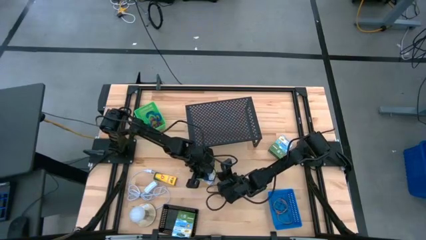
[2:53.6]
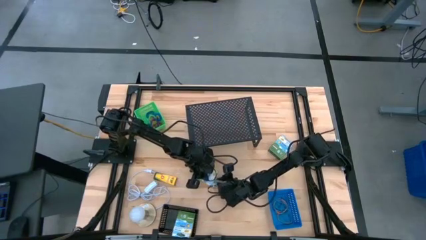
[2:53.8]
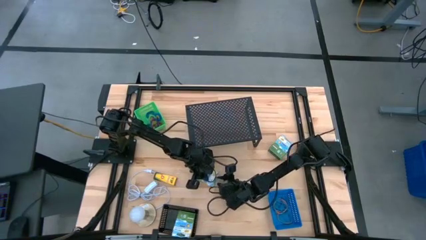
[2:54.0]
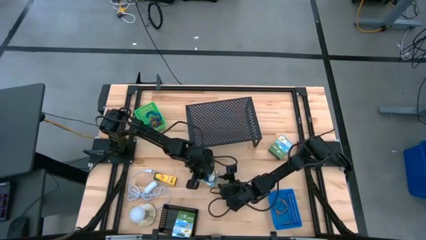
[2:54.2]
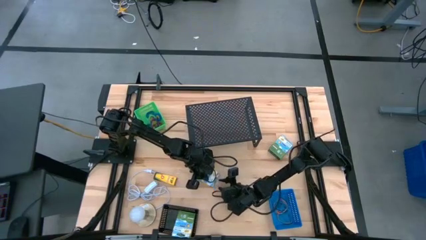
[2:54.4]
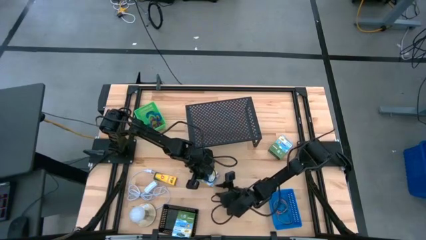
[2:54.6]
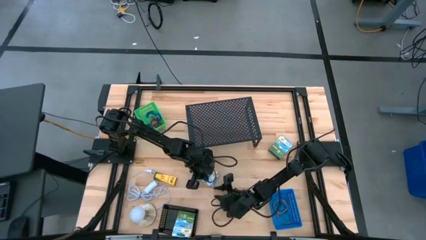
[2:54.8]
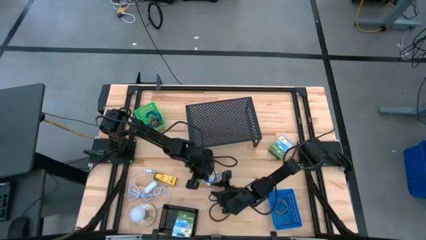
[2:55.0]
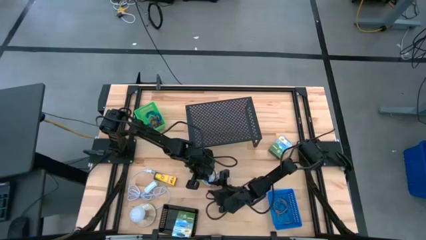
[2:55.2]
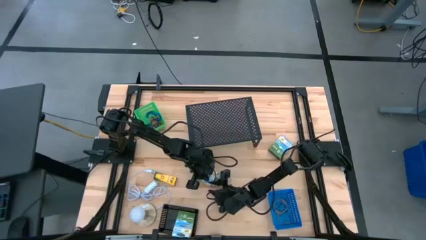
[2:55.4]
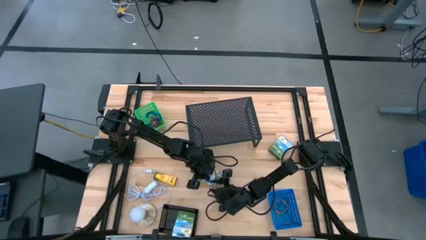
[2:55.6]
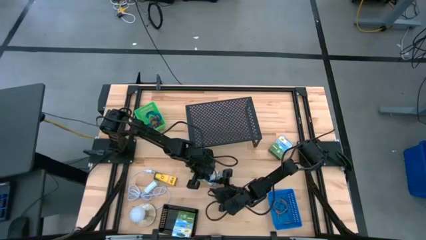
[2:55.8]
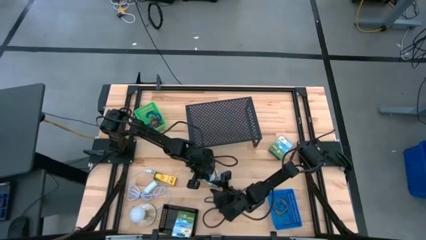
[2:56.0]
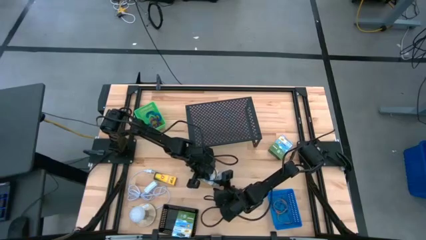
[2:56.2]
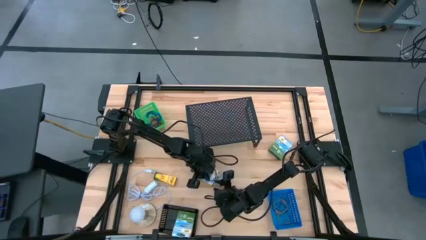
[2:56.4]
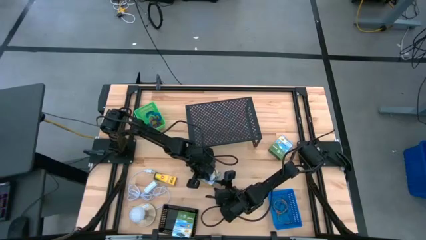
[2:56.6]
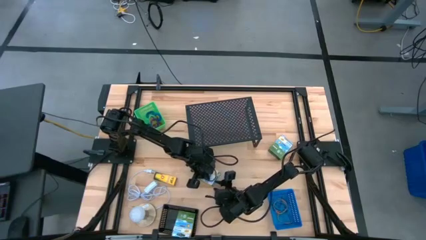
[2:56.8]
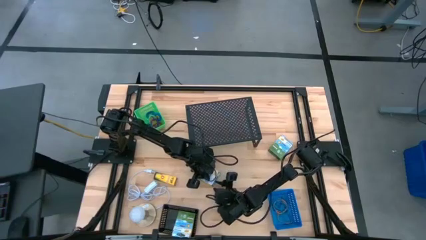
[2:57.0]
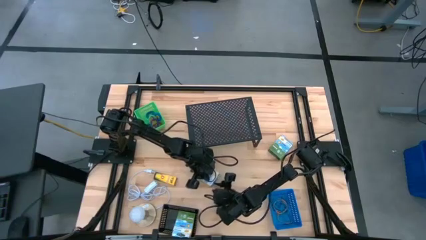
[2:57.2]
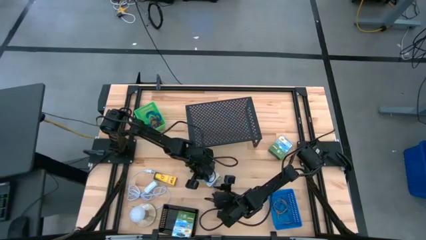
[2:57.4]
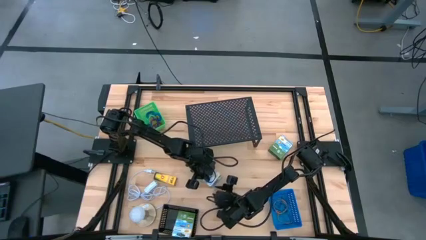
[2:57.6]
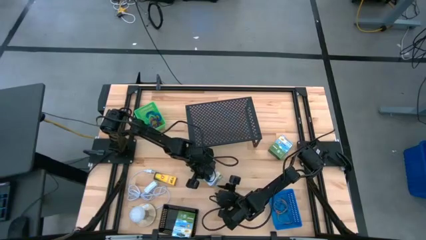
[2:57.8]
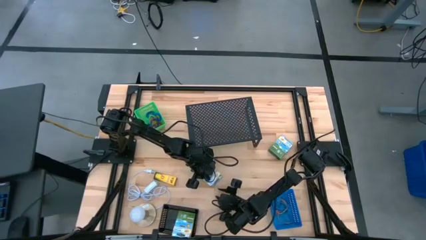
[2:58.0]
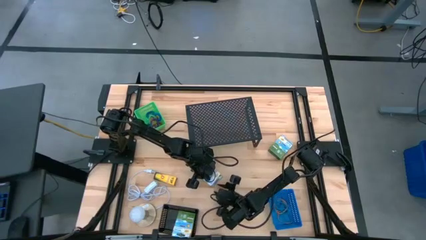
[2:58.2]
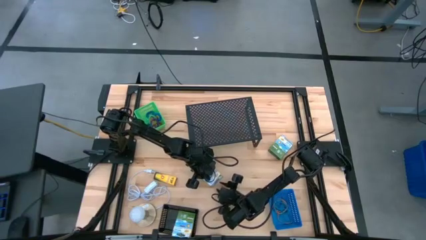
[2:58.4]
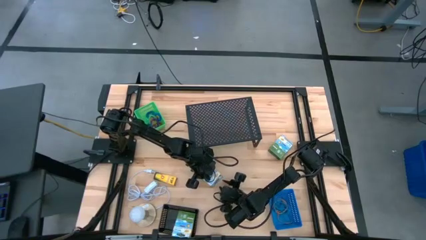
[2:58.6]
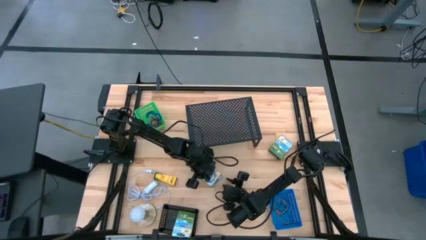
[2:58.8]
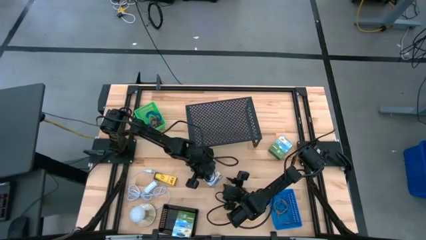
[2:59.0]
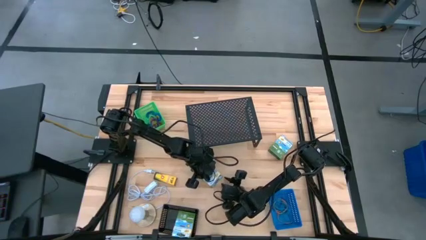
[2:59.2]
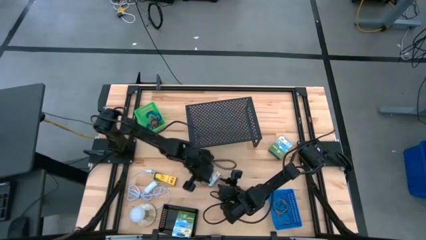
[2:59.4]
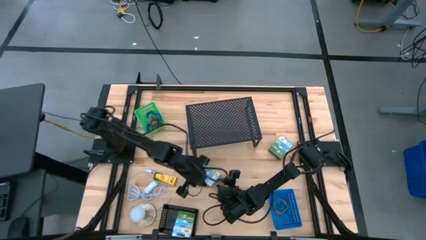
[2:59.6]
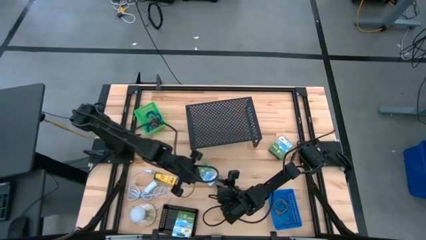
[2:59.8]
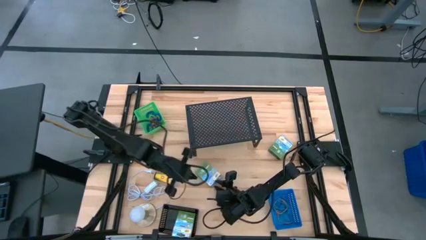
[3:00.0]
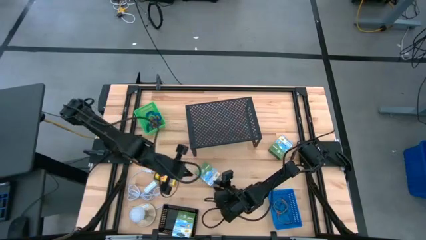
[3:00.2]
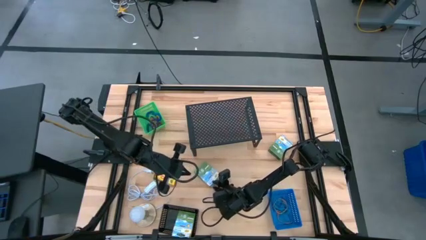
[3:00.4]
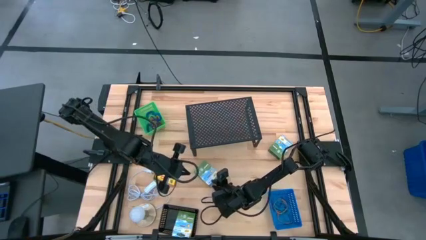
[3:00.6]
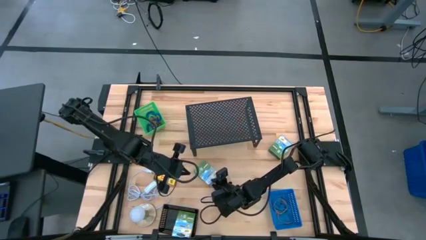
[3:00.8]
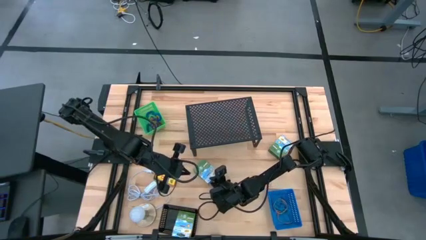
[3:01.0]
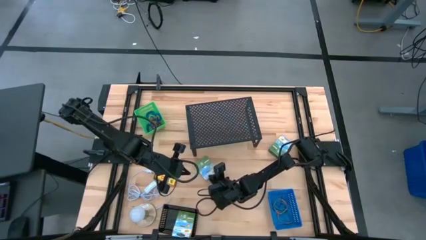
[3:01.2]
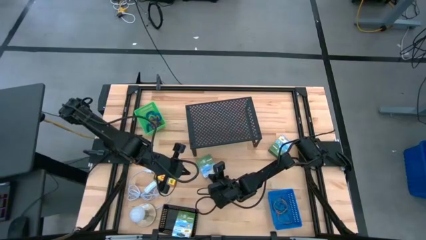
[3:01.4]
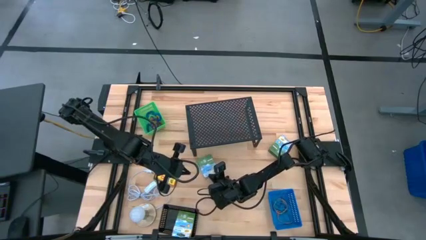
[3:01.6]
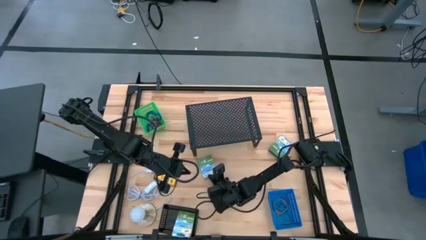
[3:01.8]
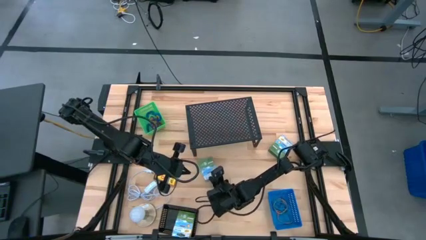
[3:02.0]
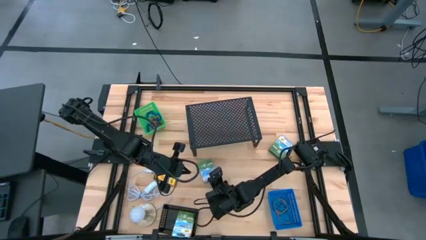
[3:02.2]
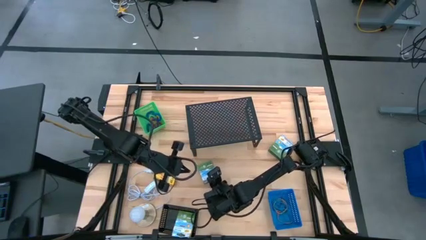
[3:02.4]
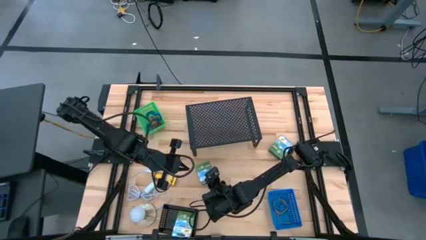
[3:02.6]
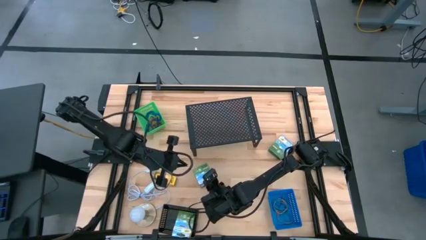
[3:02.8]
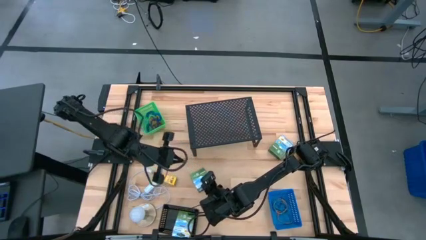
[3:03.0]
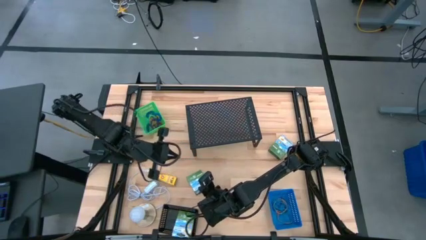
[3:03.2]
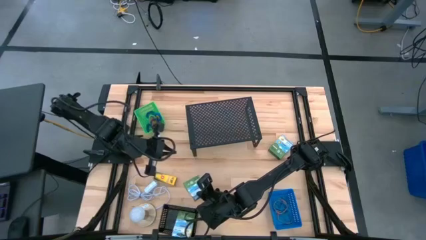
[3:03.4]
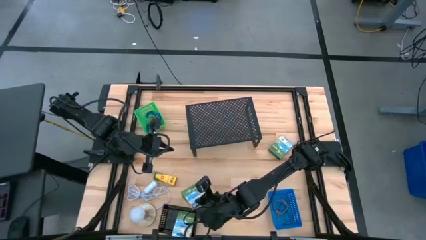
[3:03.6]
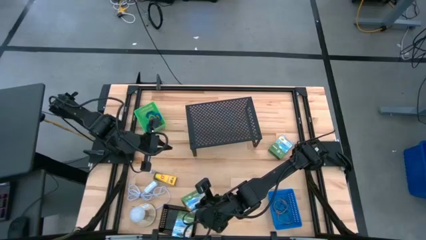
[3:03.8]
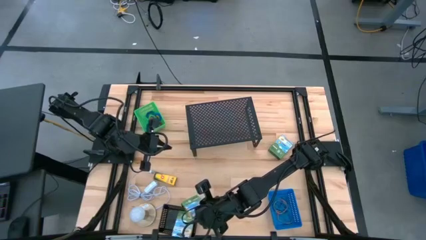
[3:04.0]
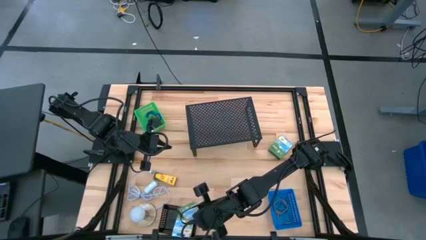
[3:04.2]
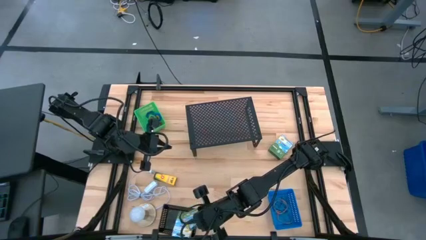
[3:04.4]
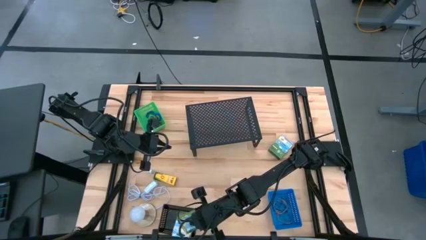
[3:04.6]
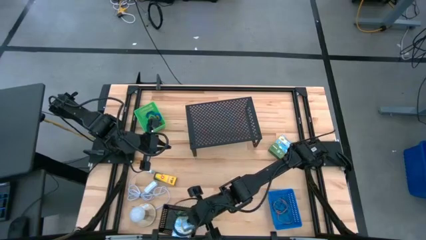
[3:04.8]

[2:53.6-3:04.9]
Task: Pick & Place Office Desk Supplies
Put the yellow crayon box into the black bin

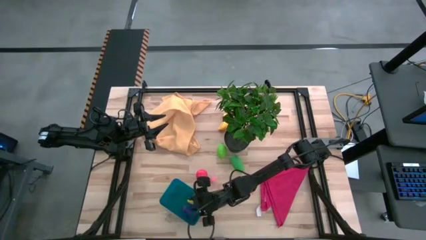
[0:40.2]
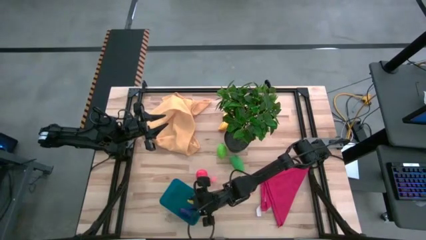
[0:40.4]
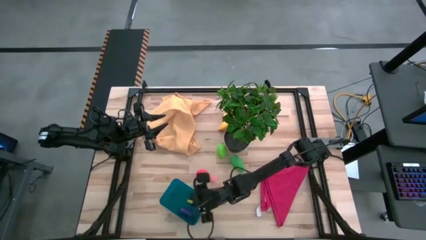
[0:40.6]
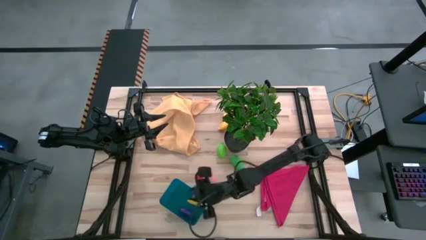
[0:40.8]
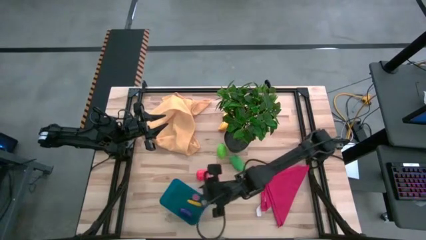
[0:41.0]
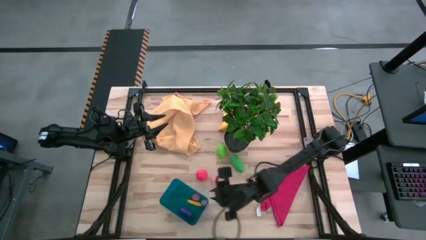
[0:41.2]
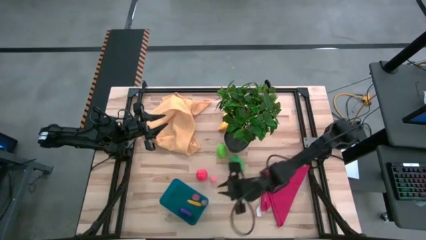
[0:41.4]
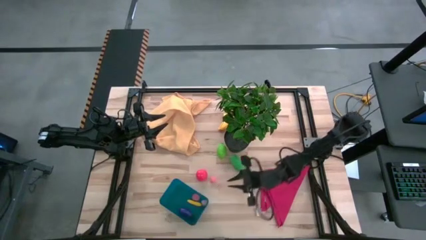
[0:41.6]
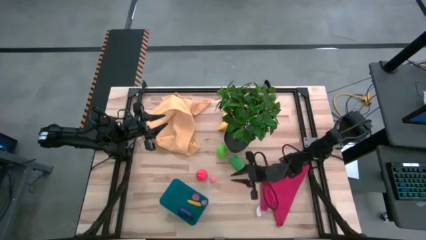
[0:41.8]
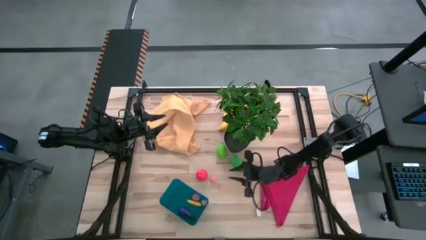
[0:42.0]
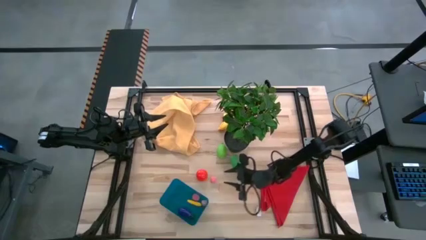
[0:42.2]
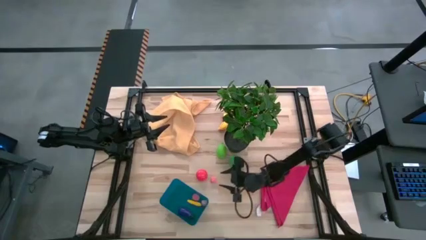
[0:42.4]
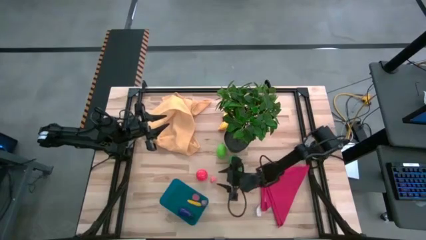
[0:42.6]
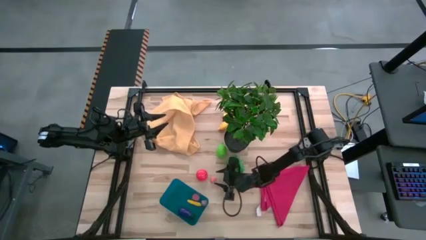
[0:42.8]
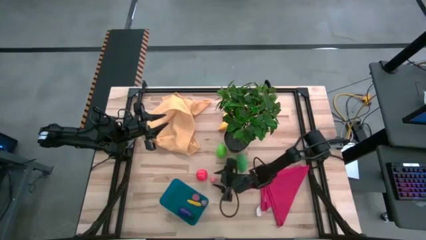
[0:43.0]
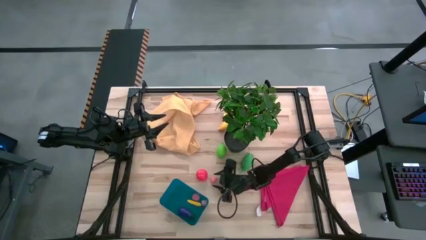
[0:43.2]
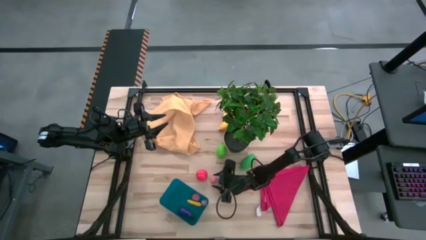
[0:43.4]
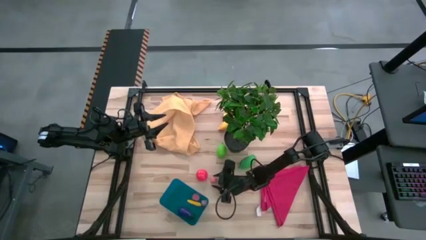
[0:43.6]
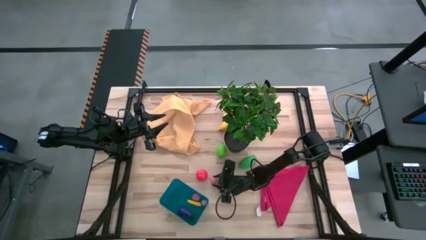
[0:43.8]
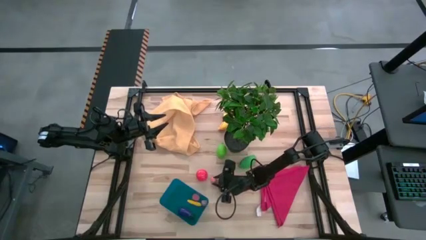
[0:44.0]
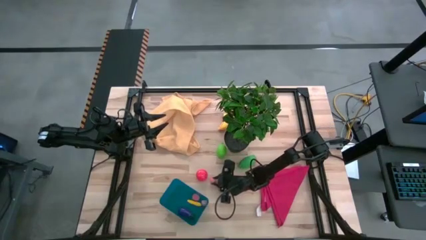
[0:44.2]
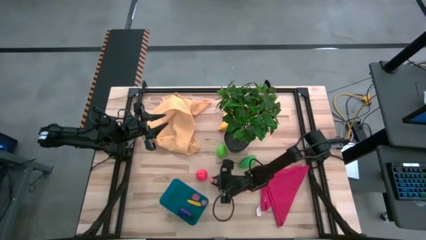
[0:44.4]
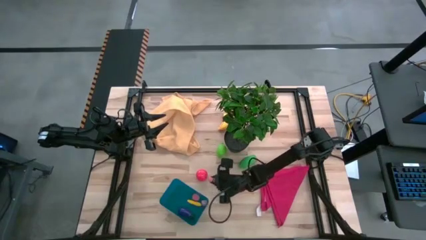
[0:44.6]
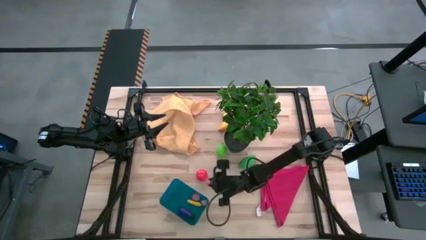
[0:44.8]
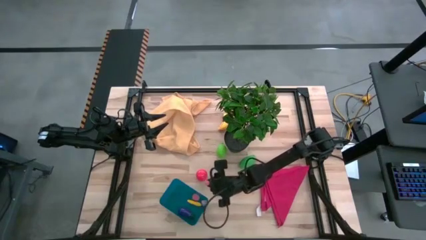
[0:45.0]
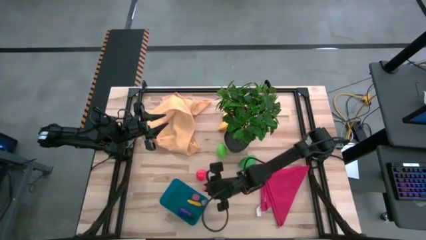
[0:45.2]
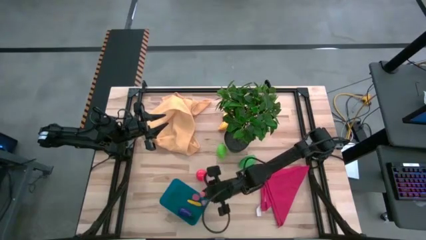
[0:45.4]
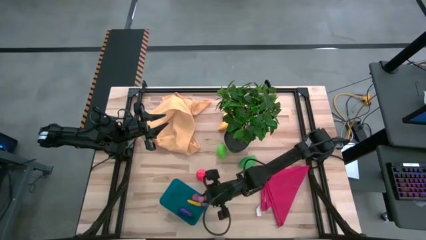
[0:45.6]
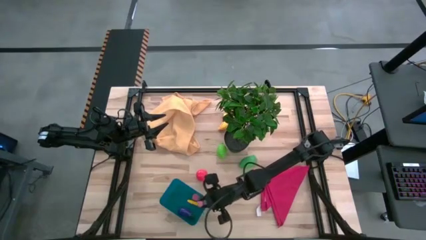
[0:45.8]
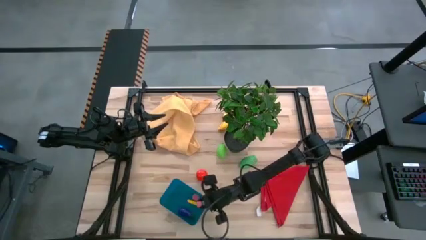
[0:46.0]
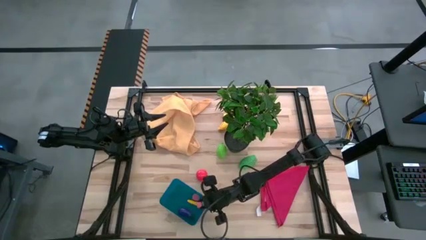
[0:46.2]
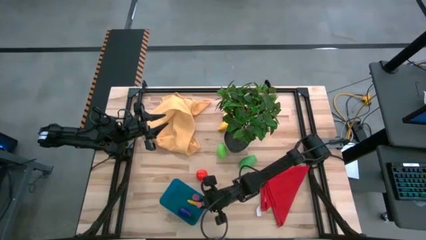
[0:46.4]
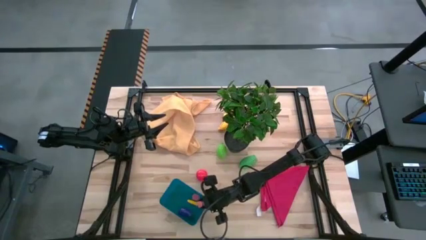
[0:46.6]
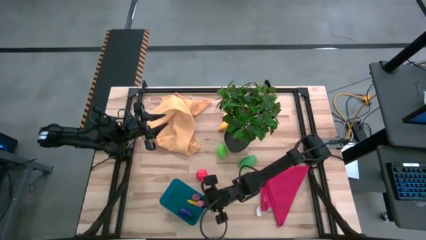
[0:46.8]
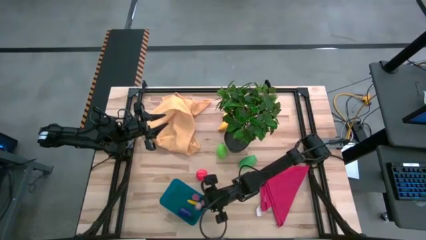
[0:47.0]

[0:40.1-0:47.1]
Task: Pick and placing Produce into tupperware
Put the pink peach into the blue bin
